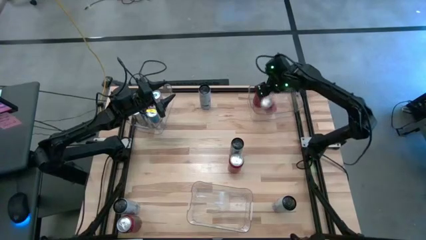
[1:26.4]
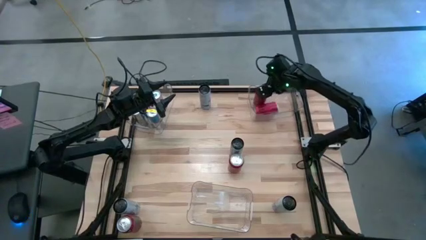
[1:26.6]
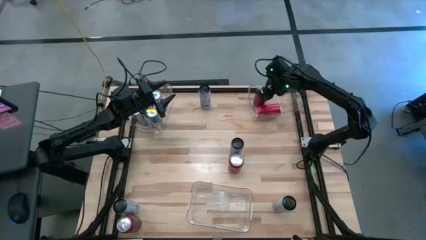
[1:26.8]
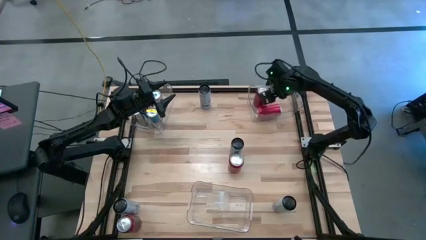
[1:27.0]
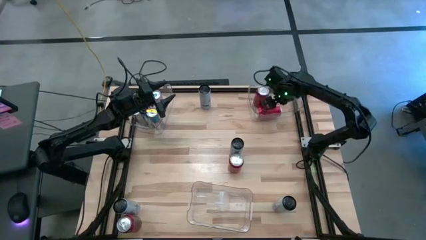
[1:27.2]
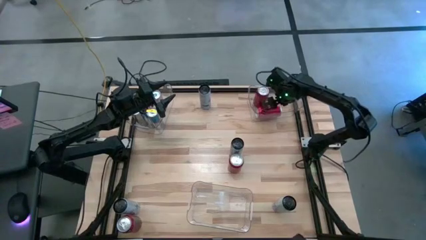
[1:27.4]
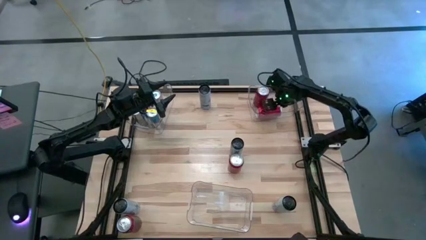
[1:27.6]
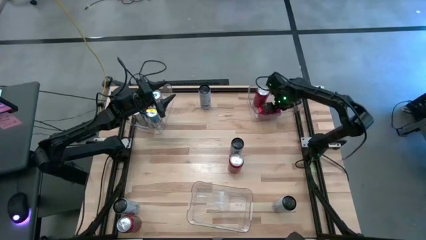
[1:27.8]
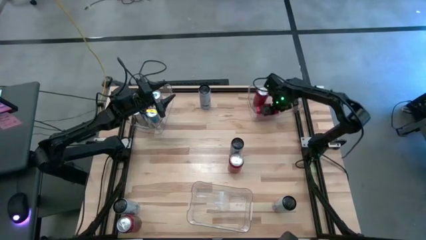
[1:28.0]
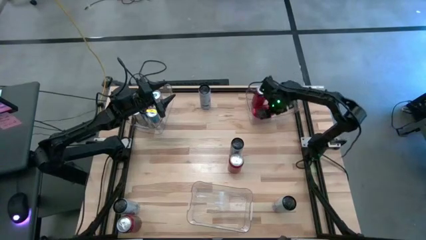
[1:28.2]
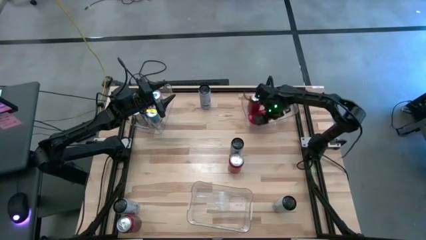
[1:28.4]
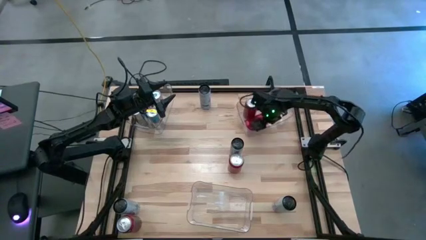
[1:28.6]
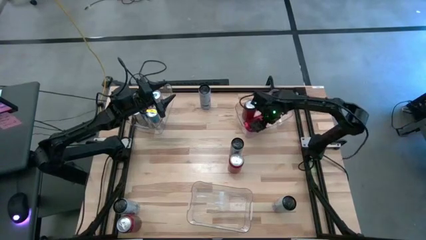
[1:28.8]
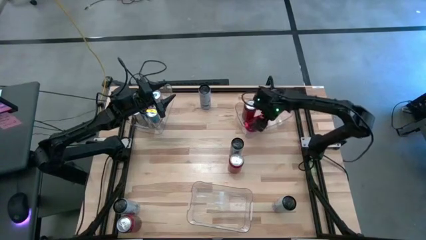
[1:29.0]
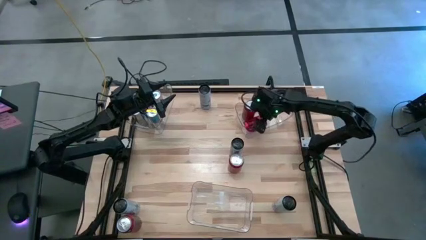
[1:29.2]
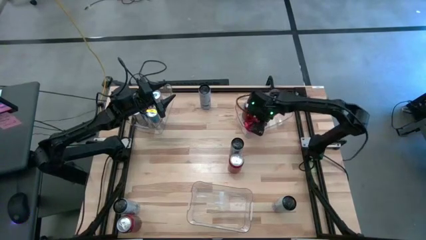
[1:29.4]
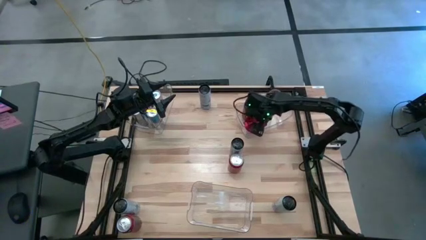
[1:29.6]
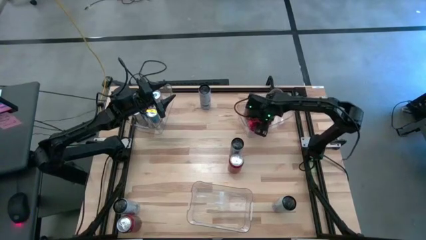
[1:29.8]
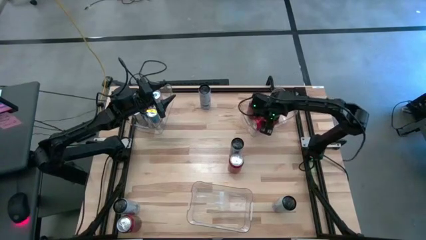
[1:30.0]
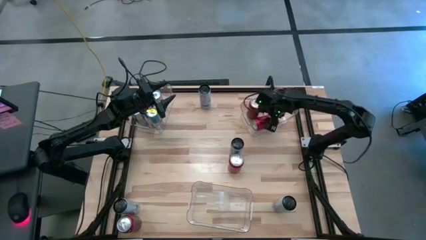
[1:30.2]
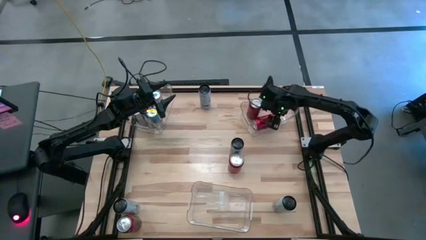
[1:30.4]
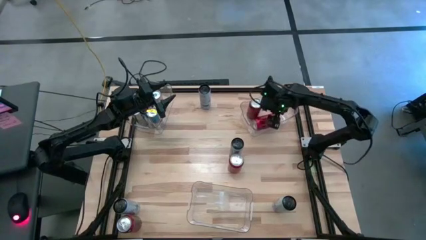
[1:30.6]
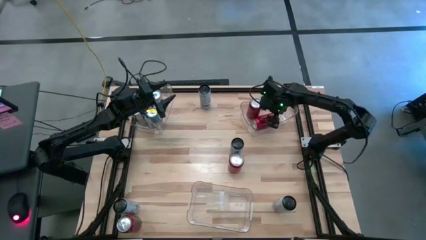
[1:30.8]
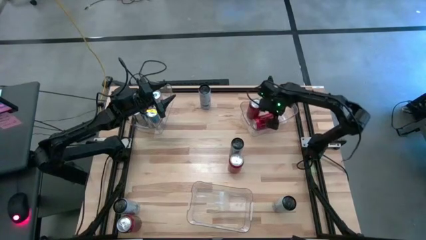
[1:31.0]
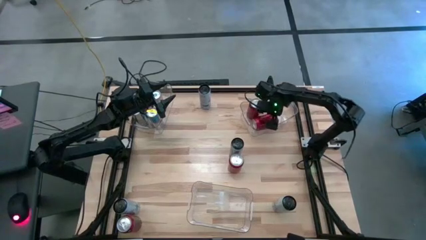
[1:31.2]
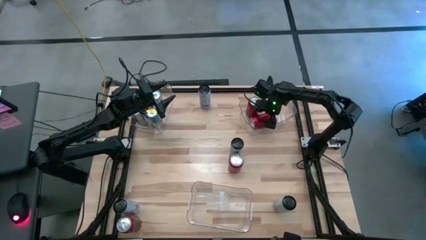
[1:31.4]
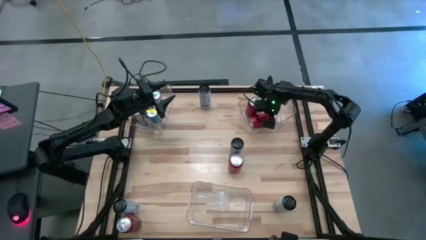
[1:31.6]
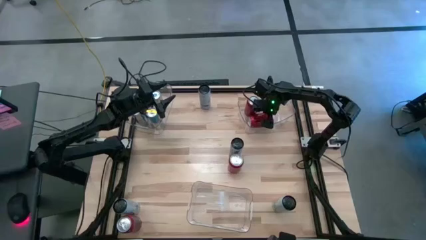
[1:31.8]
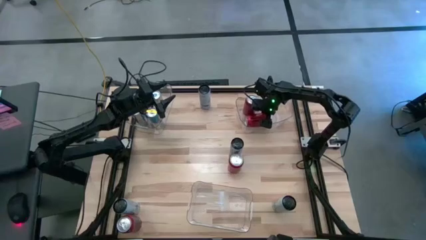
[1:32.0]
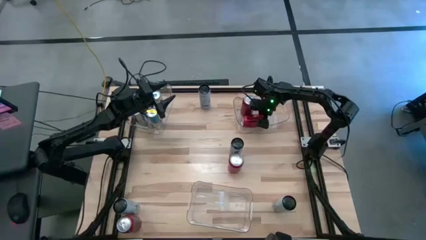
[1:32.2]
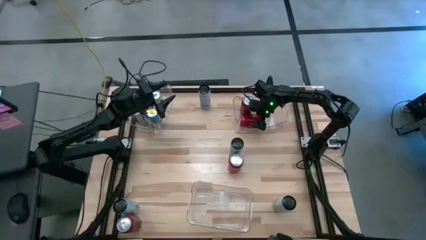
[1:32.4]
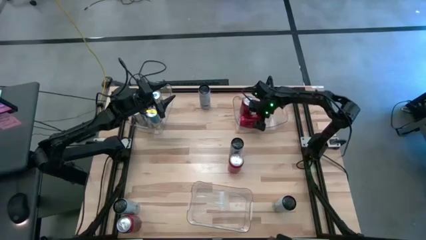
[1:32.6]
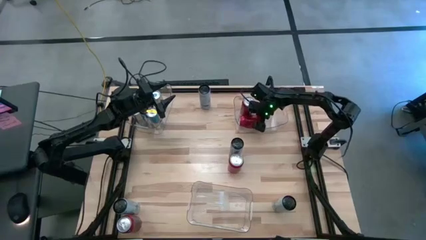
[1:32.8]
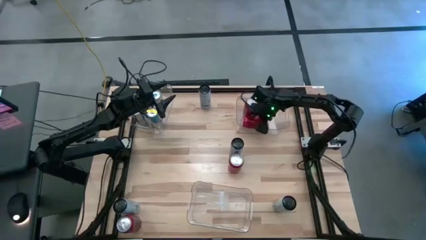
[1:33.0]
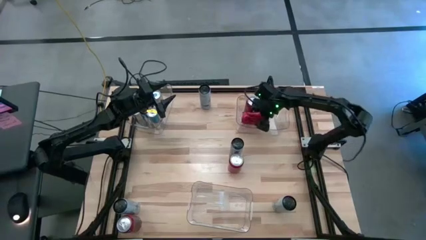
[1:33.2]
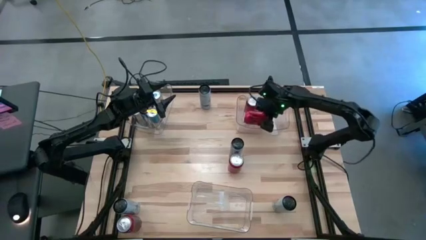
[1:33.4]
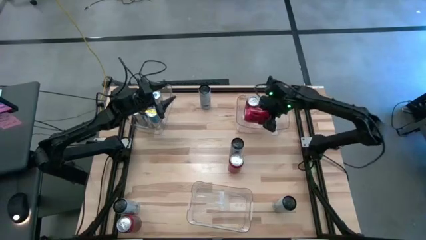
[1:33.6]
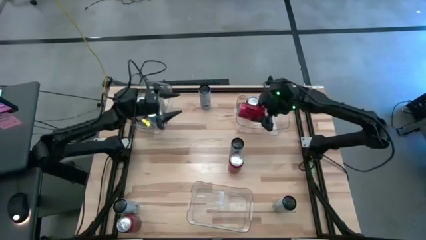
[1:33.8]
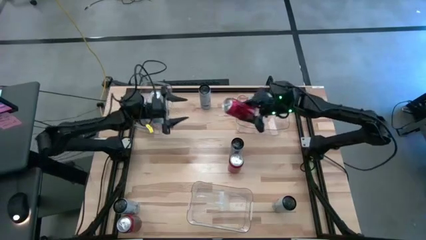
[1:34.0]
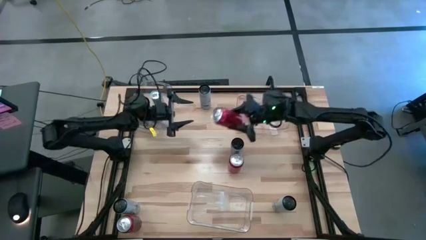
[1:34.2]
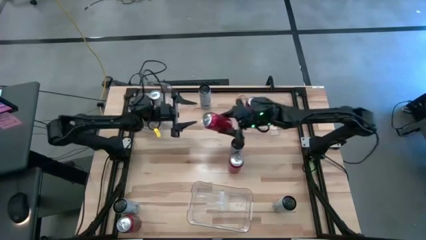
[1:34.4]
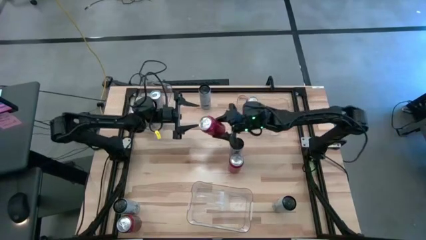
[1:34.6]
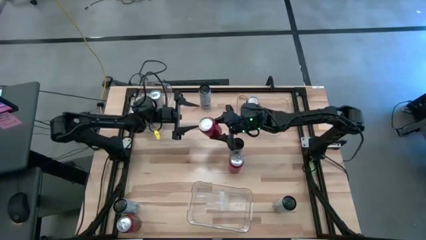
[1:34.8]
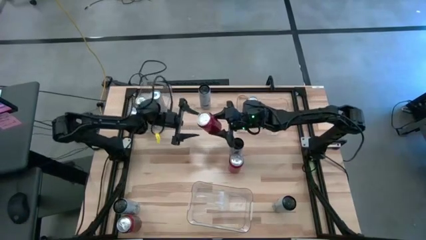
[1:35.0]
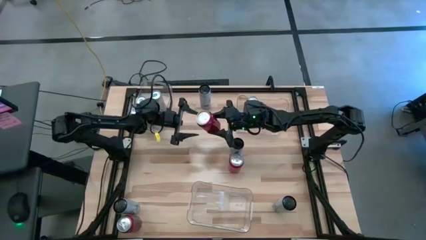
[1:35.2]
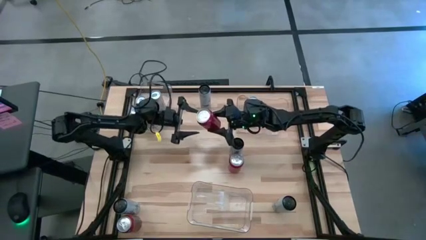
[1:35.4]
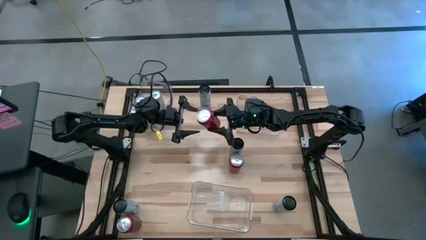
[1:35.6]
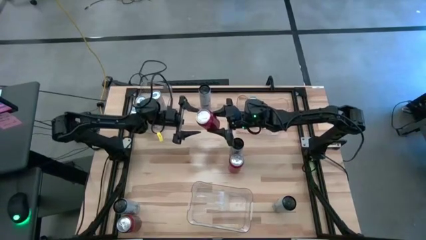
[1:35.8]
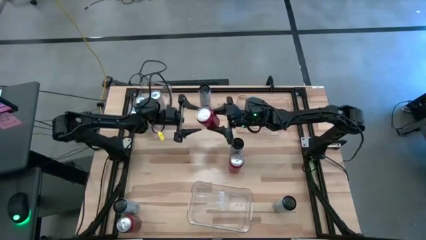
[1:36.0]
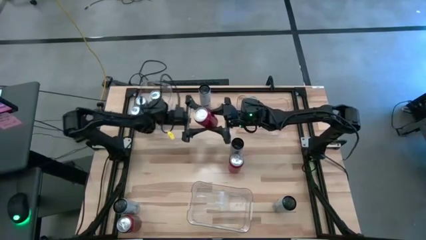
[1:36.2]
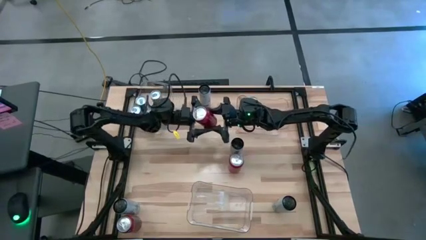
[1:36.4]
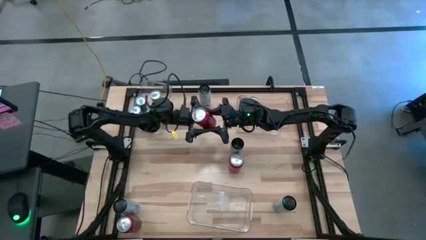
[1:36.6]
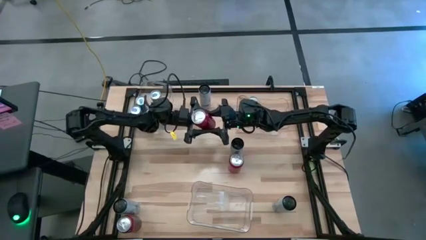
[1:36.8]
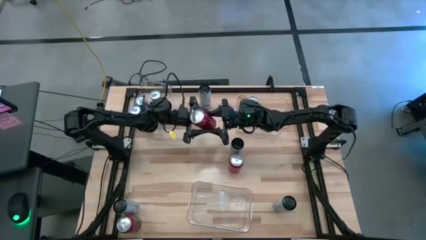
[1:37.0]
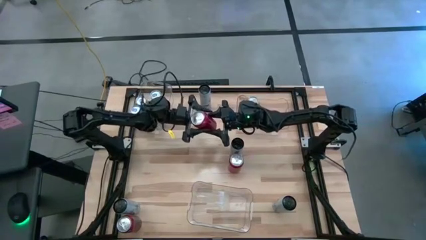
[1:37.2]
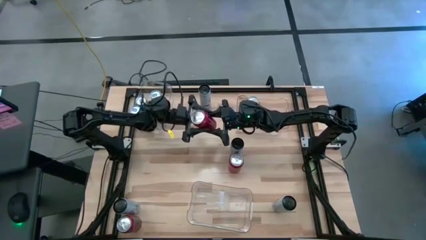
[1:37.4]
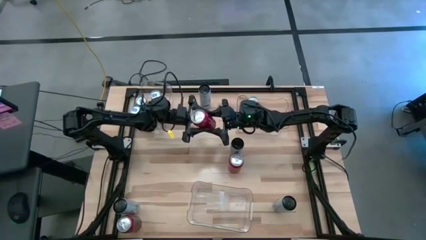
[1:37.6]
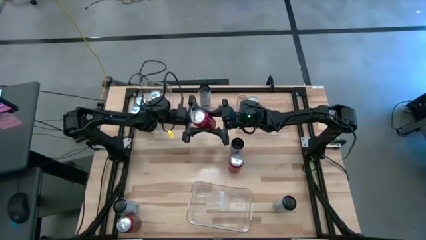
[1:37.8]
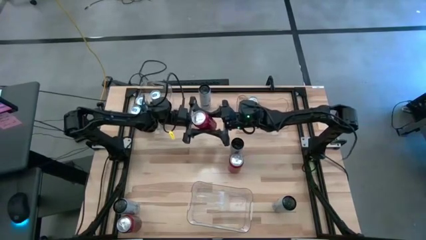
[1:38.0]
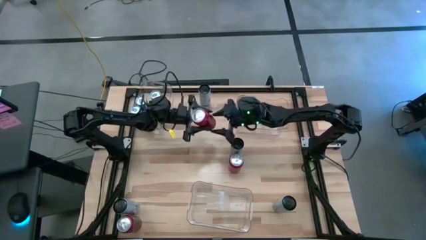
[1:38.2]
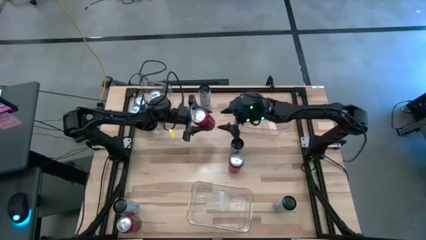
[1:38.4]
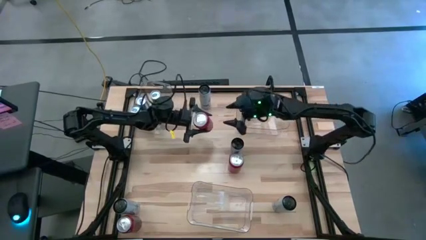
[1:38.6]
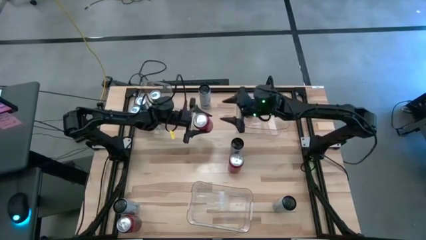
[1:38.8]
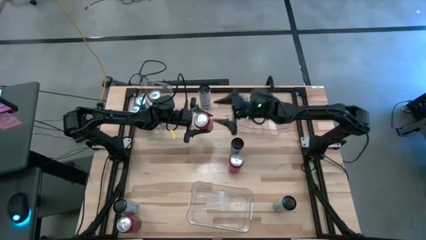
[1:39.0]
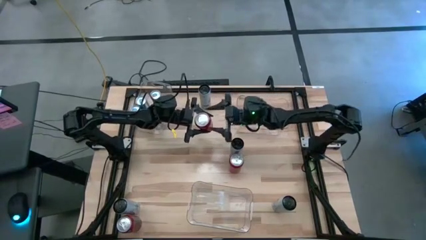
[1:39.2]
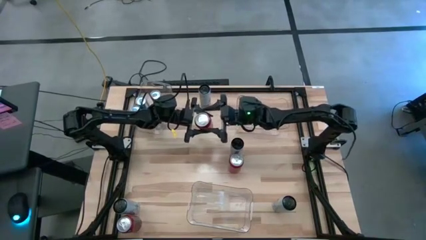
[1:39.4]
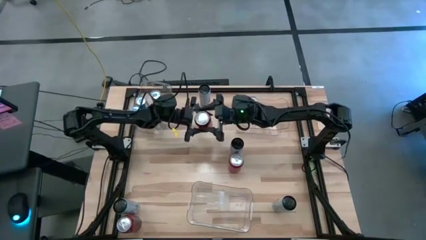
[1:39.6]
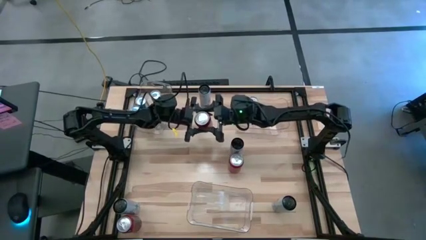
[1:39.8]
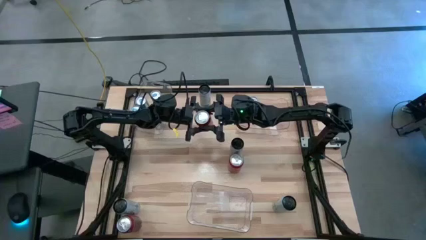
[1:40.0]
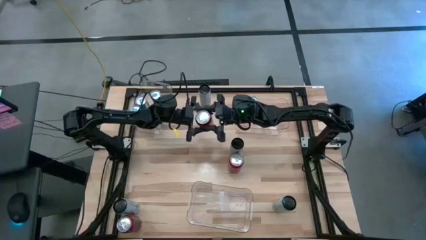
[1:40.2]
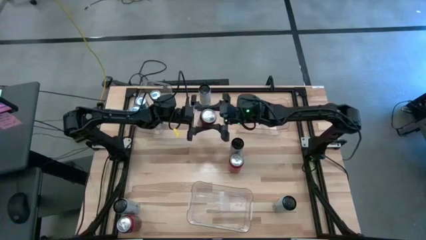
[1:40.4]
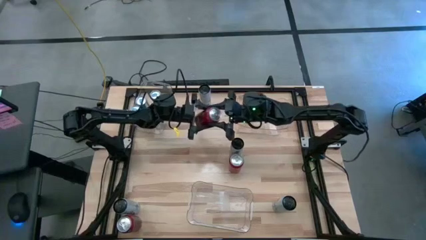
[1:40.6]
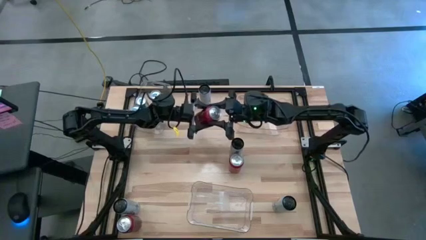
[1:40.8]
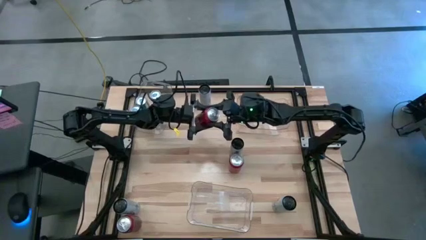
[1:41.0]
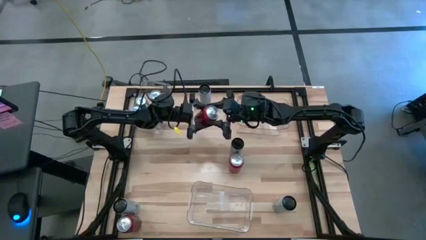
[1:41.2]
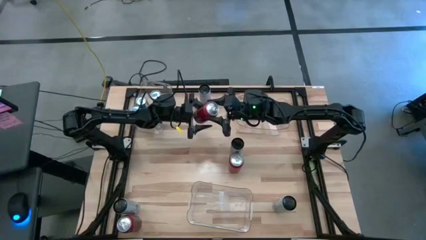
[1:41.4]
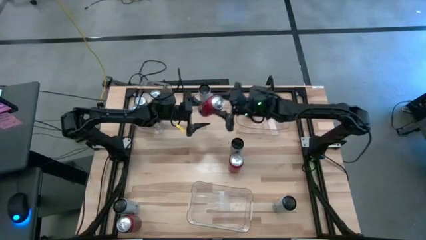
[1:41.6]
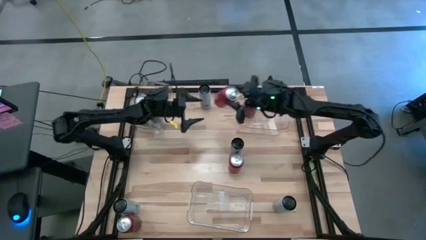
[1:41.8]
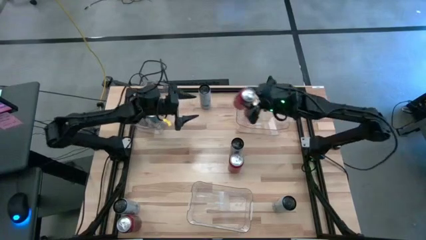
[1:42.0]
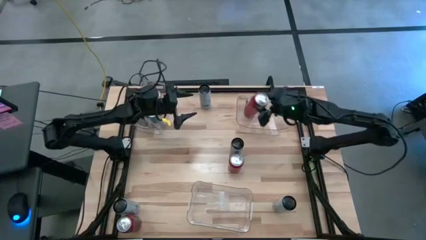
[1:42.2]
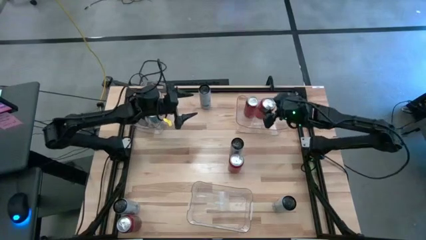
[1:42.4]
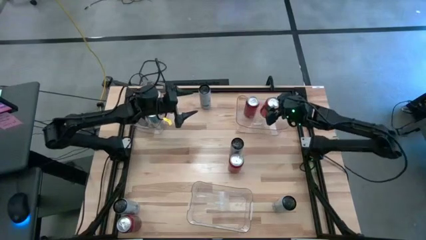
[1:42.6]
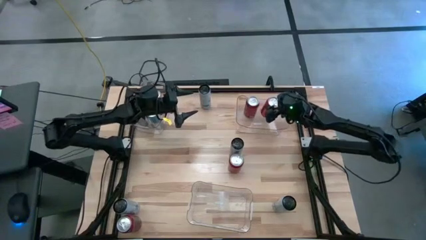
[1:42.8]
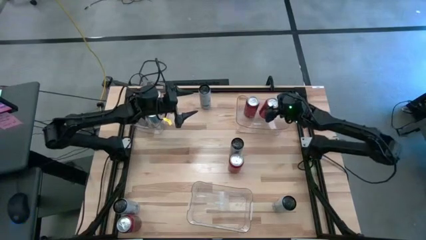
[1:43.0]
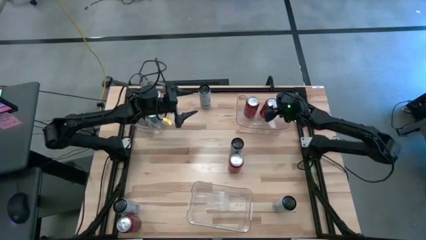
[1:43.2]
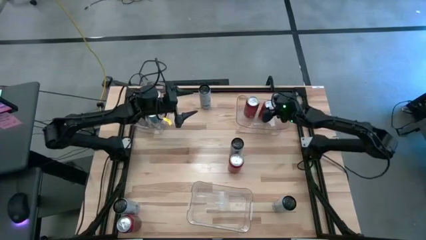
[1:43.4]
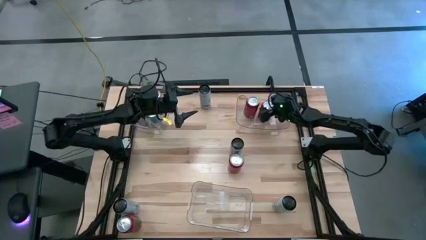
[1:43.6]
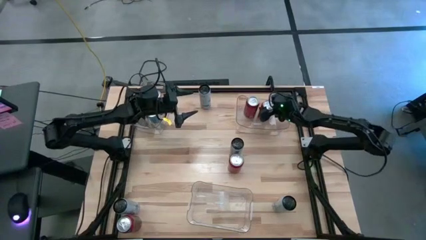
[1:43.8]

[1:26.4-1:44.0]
Task: Sort soda cans
Adjust the red soda can into the top right transparent bin
